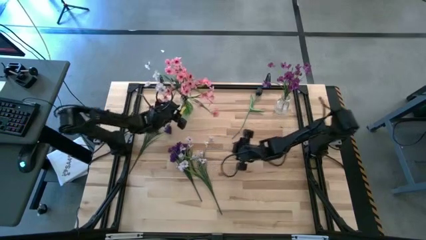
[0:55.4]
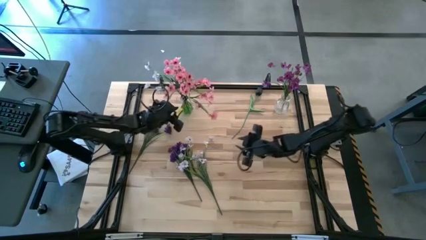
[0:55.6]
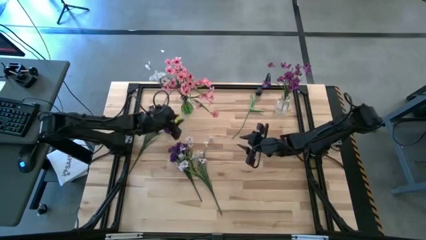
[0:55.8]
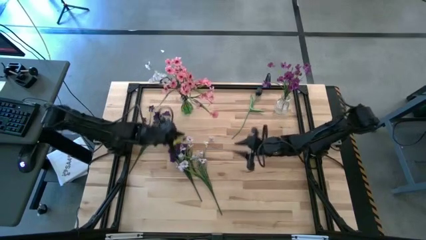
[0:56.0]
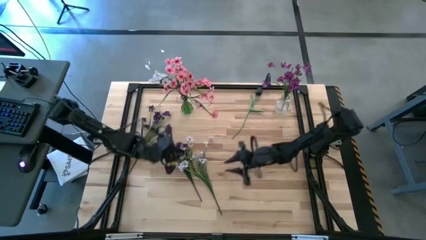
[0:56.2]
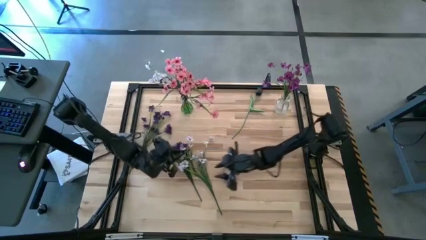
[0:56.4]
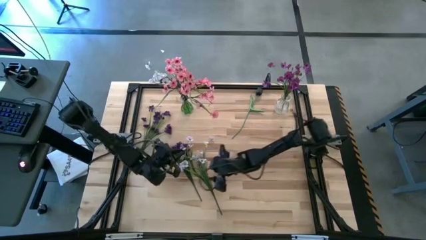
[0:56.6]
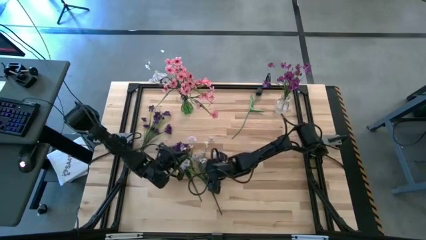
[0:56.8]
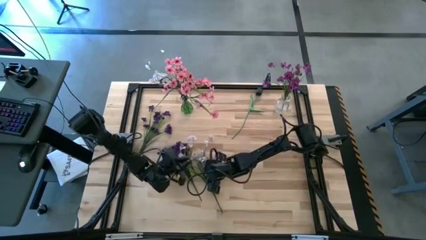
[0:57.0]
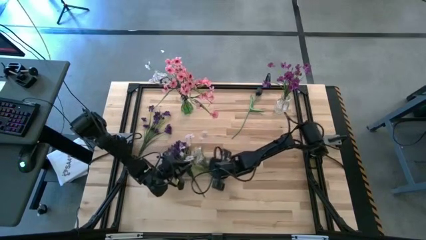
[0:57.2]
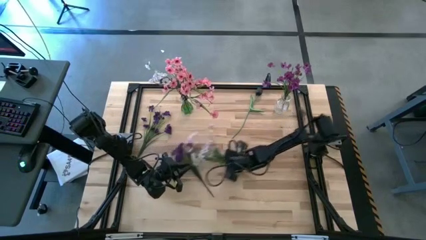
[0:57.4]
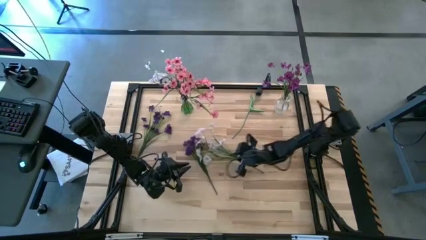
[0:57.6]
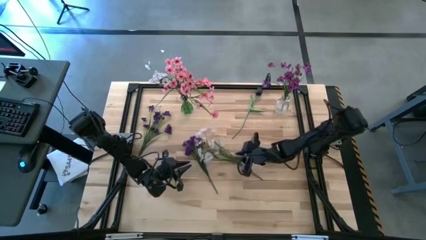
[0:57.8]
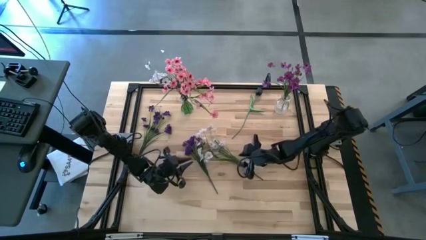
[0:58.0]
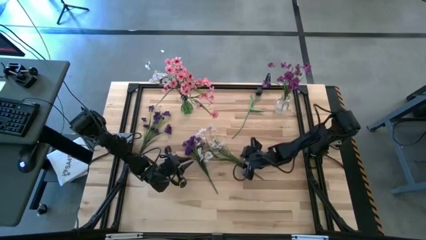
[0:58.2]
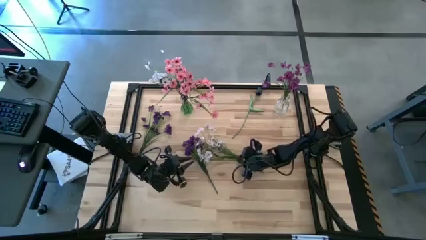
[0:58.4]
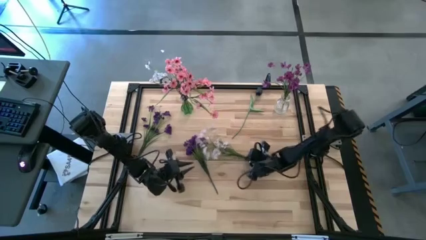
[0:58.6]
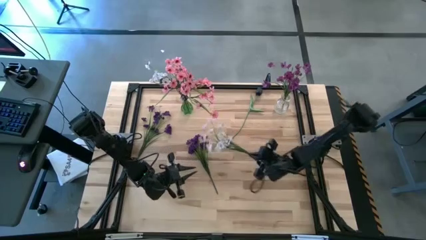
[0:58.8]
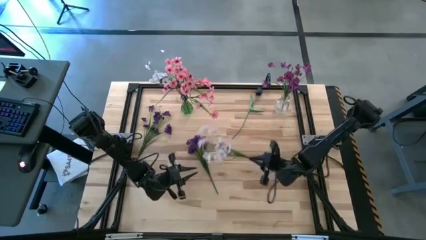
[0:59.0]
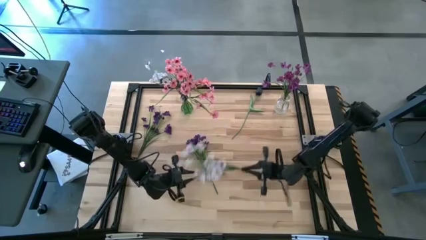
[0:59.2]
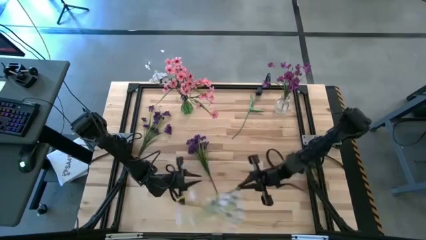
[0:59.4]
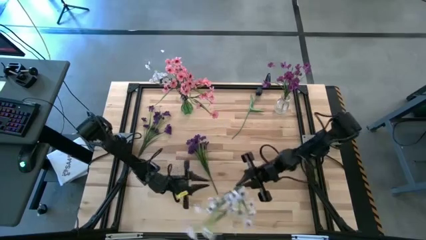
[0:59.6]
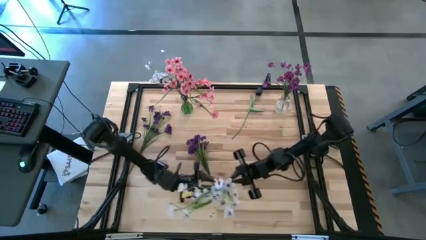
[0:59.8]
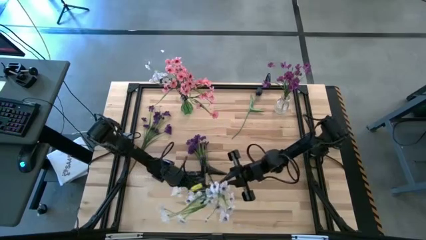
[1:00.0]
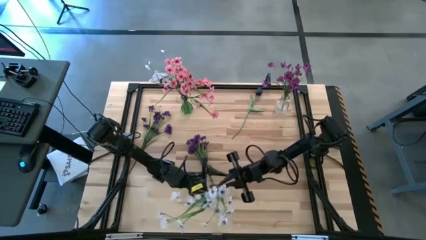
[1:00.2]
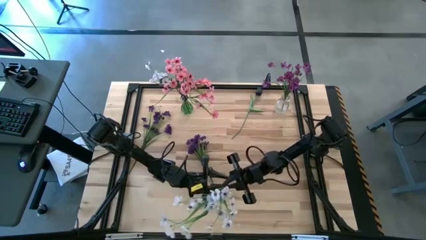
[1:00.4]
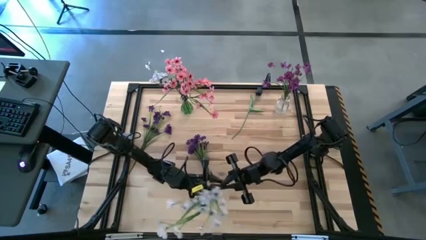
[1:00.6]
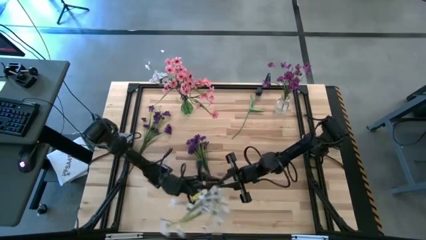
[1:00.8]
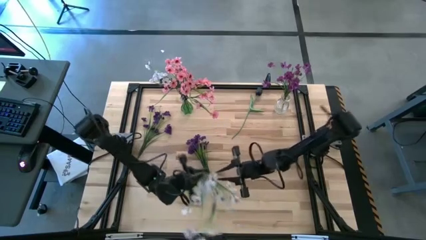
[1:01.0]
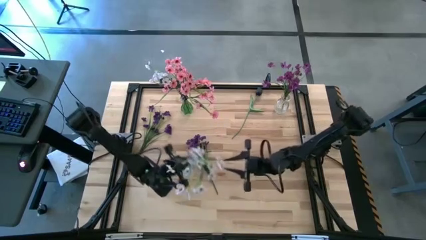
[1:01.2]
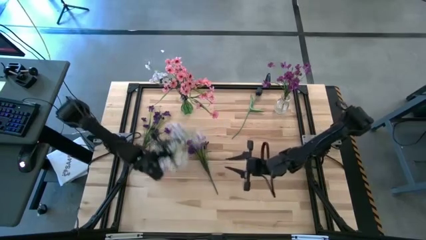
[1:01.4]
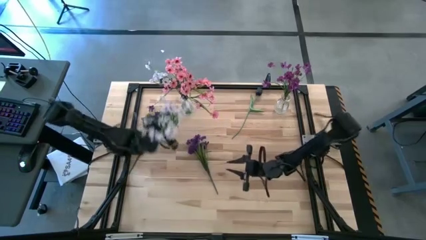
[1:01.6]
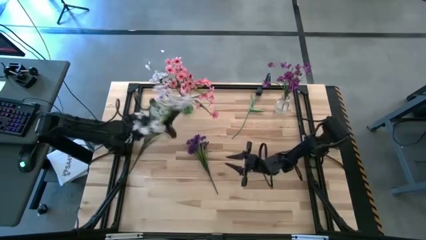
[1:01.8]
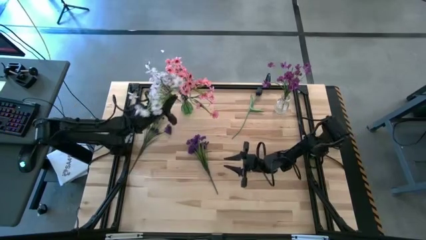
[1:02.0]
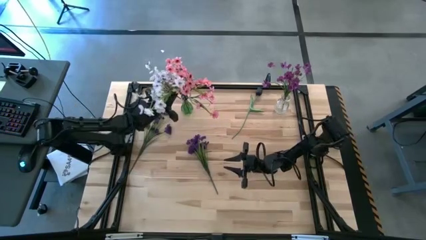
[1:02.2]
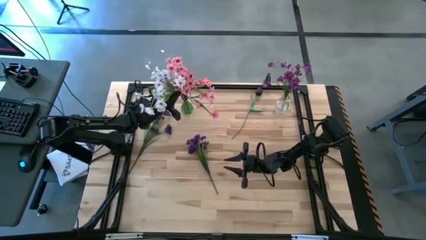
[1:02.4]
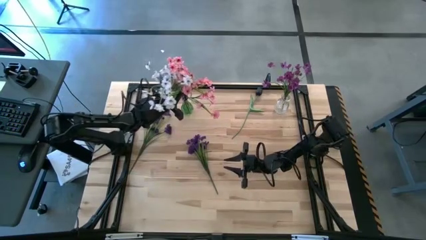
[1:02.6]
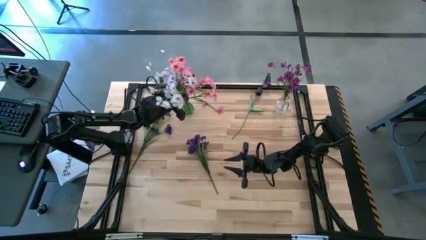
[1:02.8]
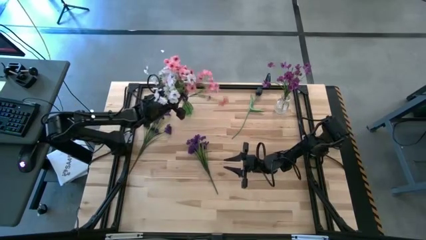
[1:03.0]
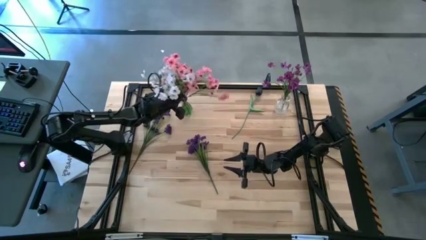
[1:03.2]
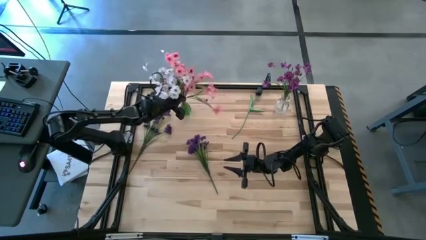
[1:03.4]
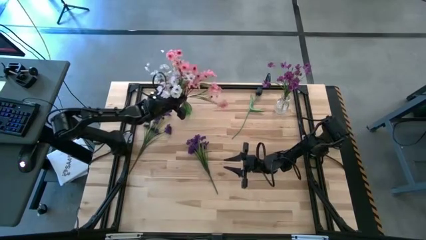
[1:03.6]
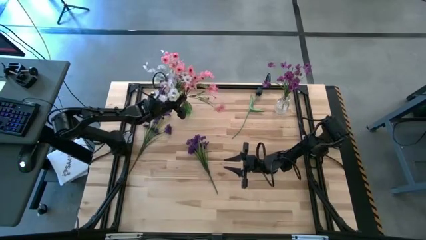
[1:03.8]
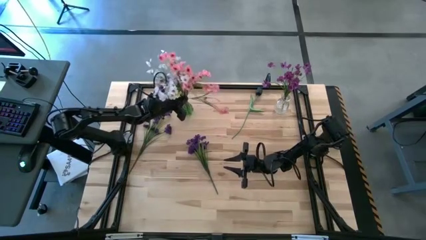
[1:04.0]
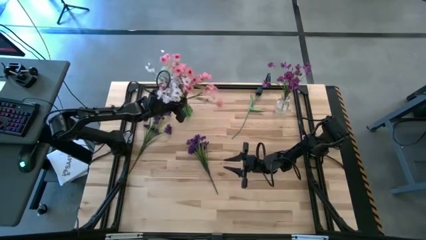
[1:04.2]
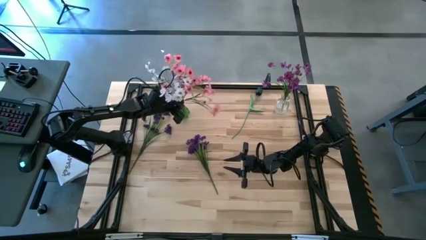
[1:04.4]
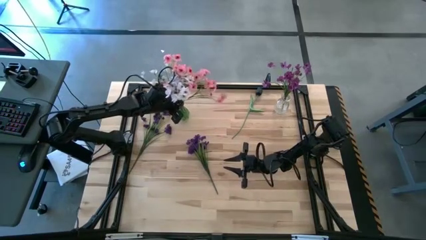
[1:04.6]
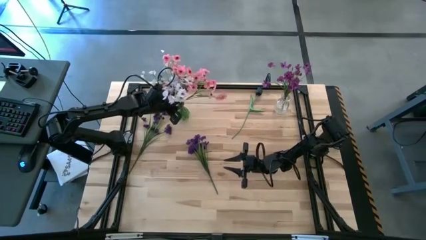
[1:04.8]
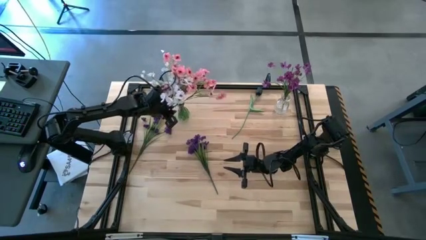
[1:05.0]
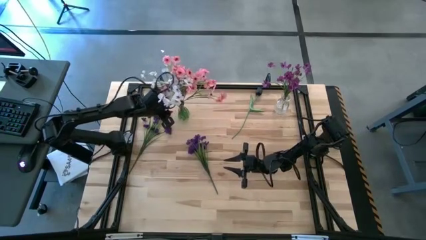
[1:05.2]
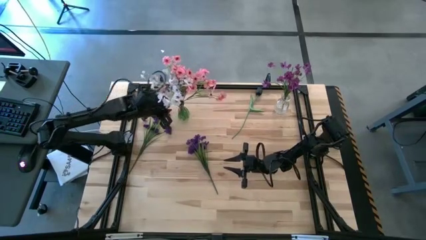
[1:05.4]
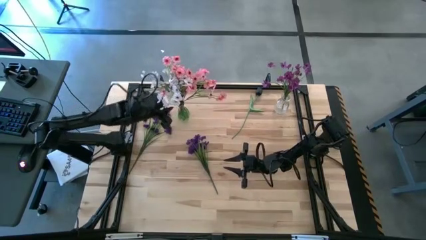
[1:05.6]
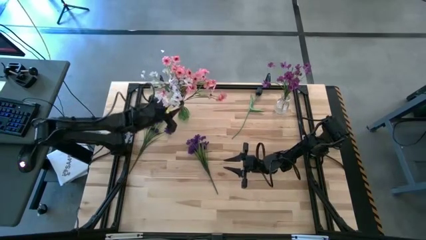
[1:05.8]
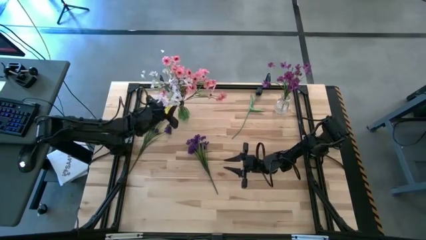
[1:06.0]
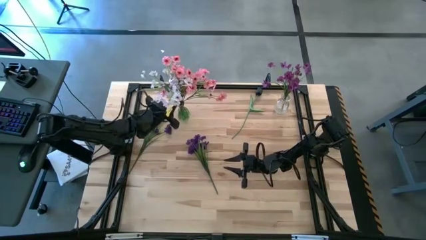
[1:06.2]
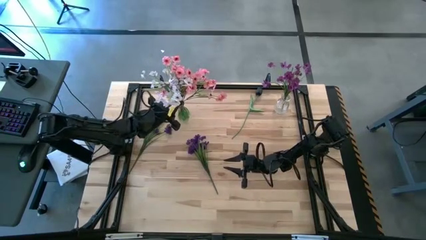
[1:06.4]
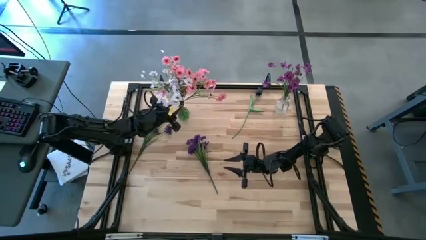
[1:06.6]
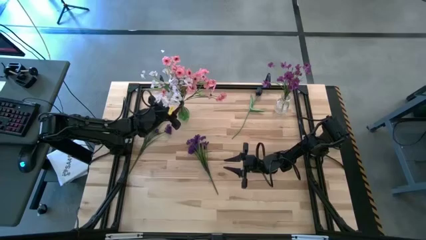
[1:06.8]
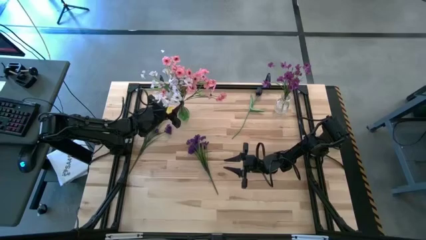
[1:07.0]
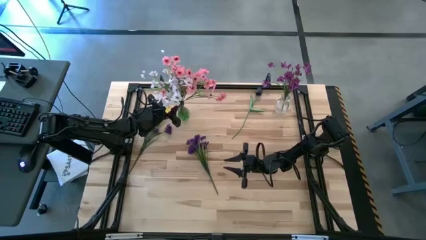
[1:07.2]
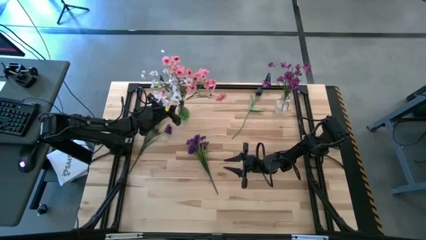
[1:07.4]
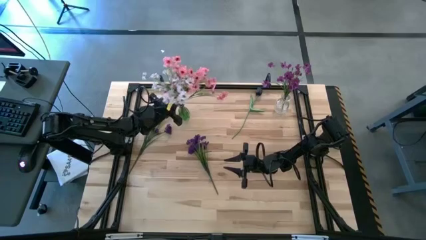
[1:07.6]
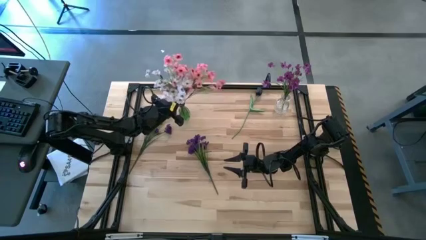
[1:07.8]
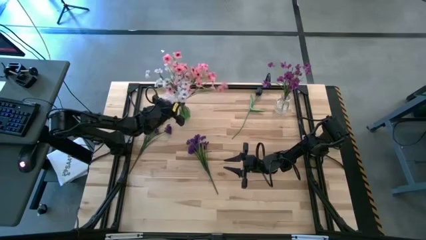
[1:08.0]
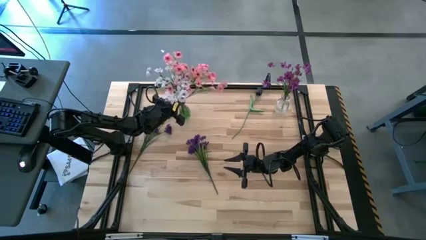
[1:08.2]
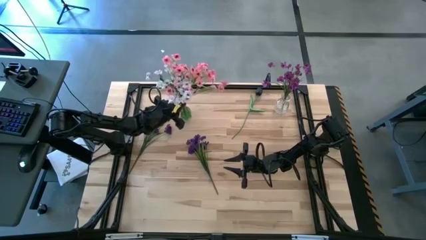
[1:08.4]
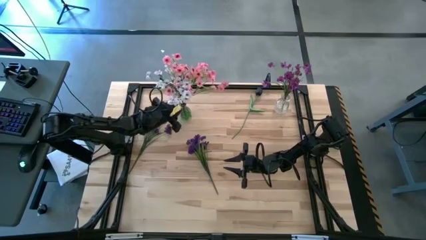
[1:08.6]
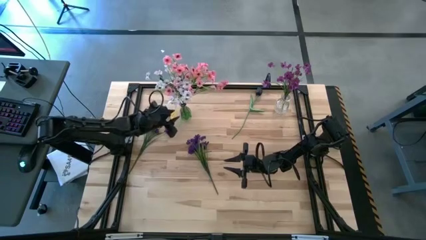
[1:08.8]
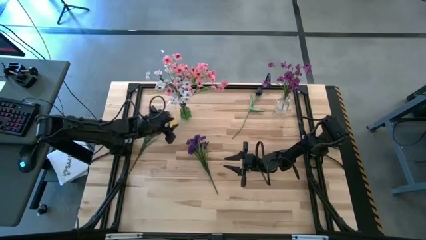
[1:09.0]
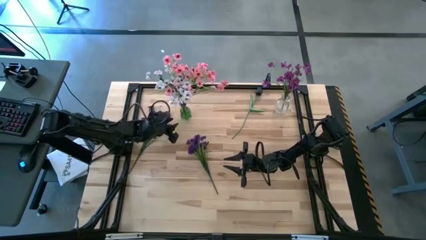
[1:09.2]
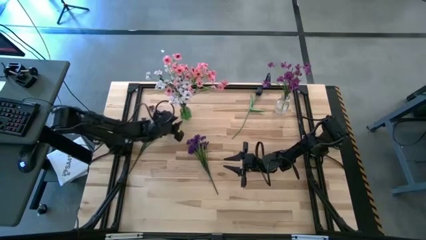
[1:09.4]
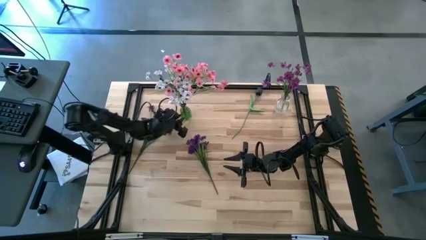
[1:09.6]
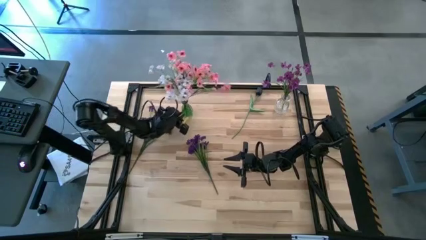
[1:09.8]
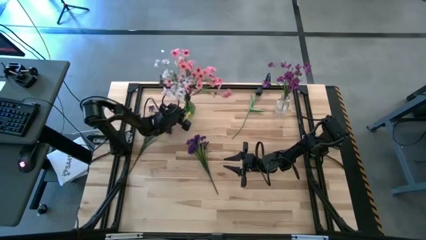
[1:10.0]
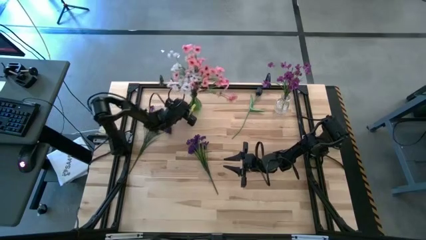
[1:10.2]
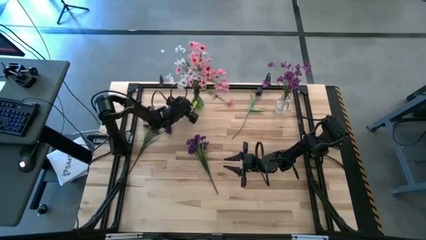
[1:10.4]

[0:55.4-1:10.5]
Task: Sort flowers into vase by color
Put the white flowers into the green vase
